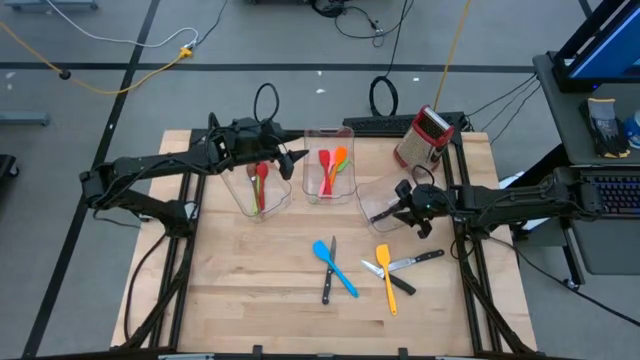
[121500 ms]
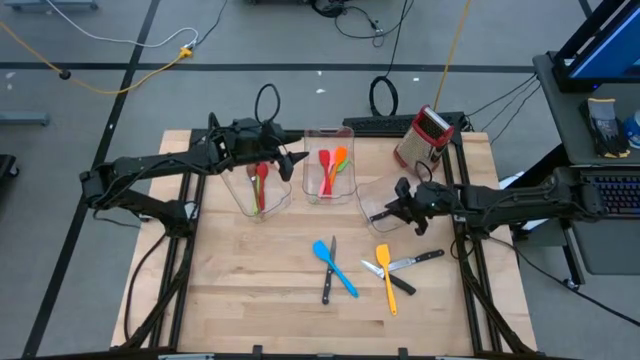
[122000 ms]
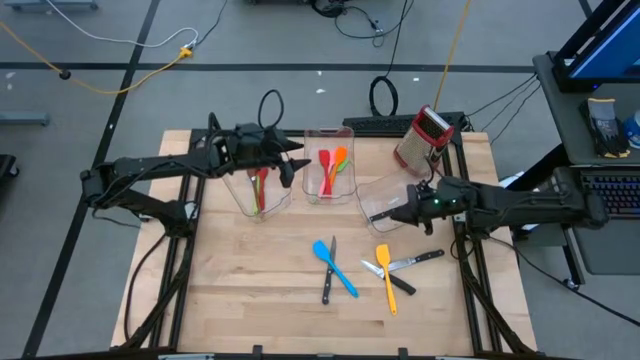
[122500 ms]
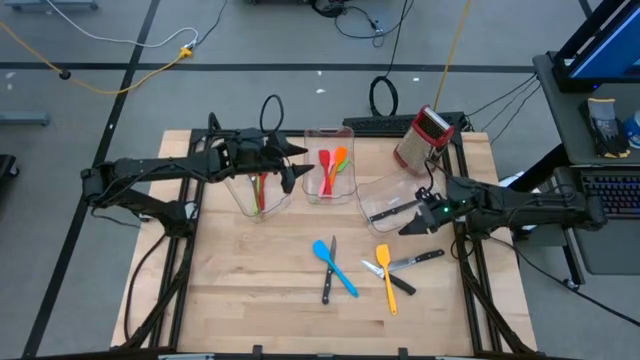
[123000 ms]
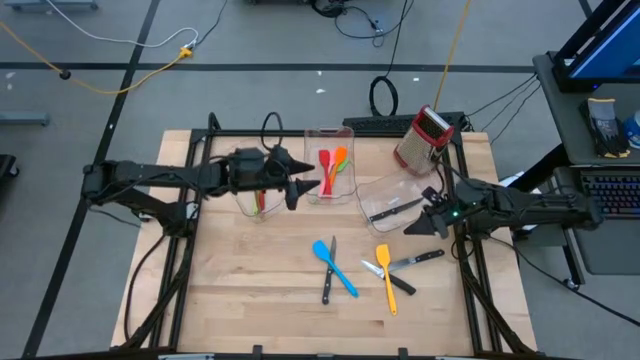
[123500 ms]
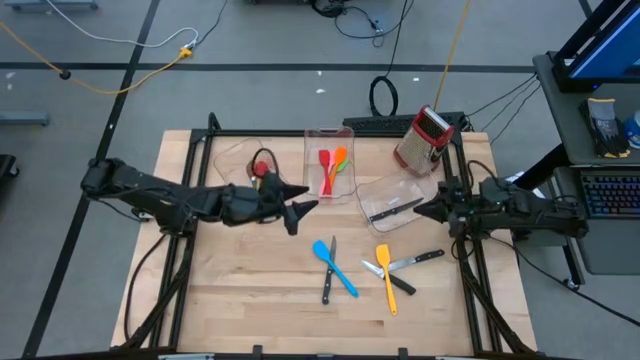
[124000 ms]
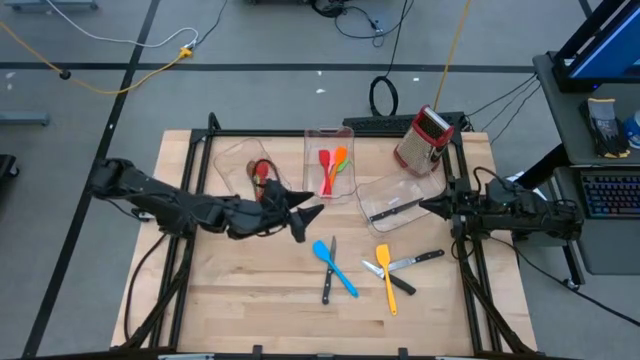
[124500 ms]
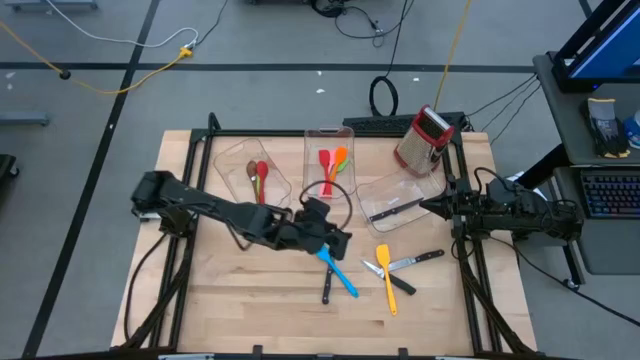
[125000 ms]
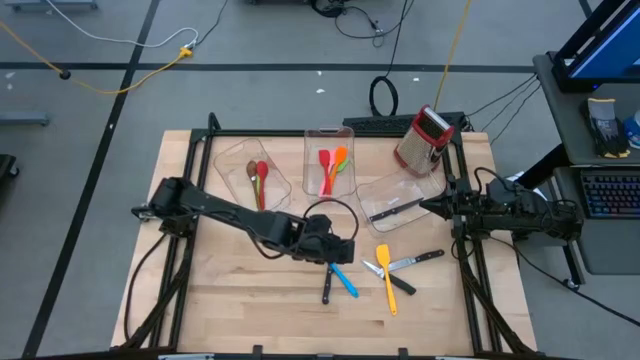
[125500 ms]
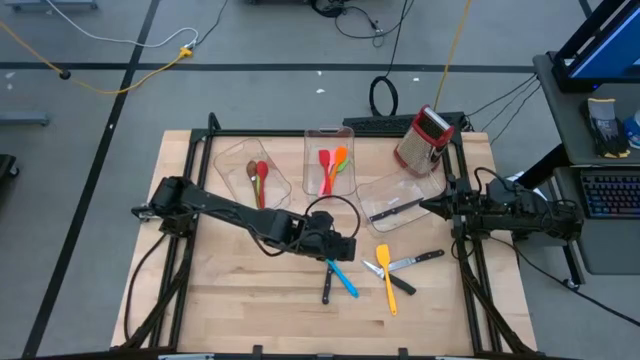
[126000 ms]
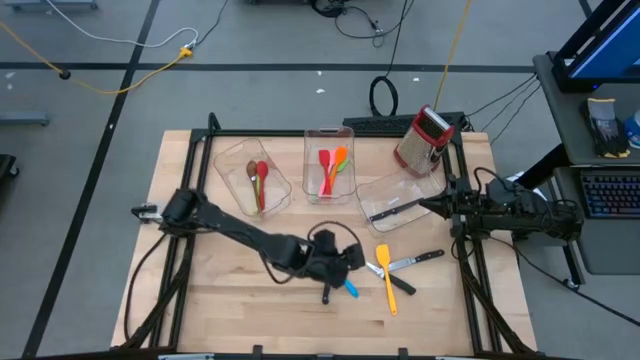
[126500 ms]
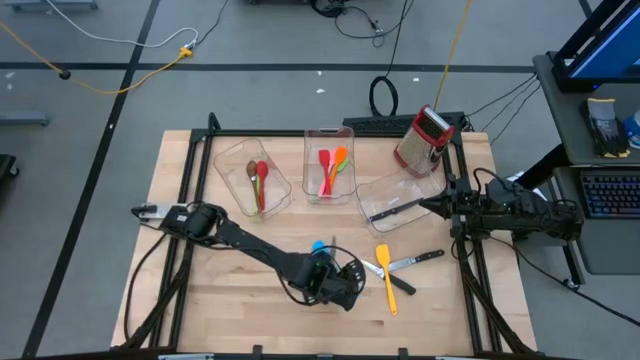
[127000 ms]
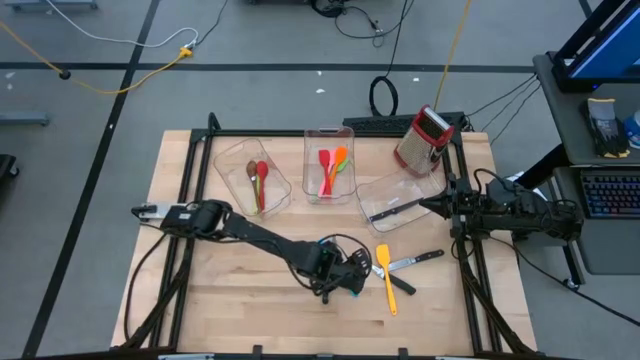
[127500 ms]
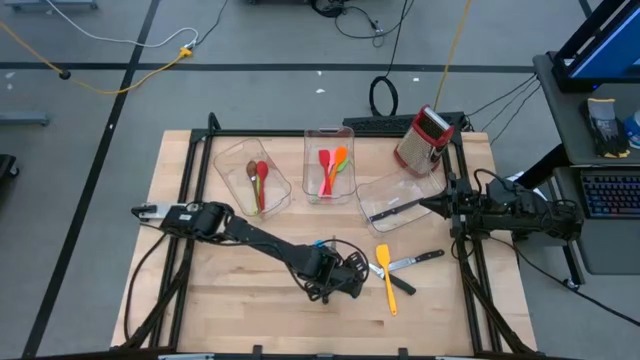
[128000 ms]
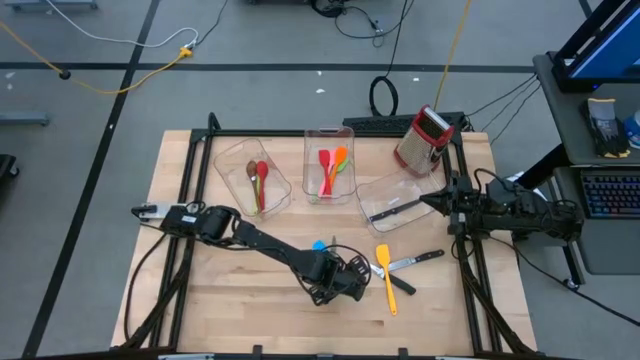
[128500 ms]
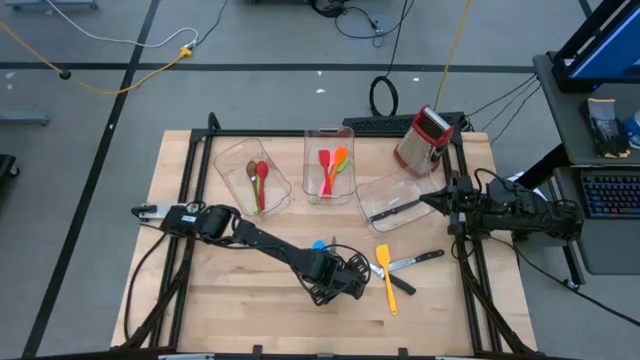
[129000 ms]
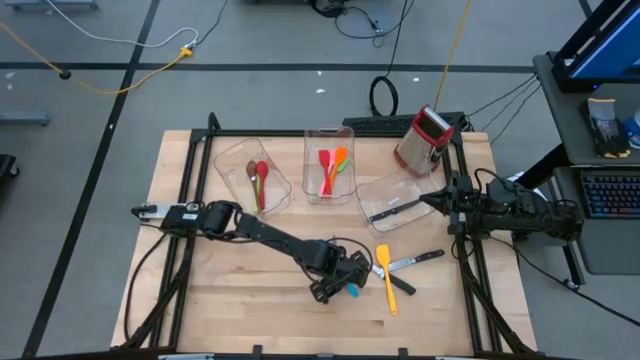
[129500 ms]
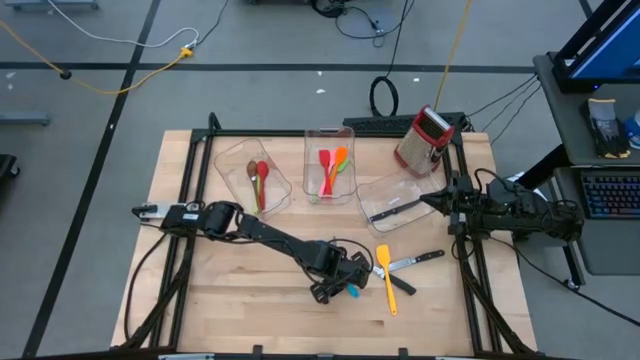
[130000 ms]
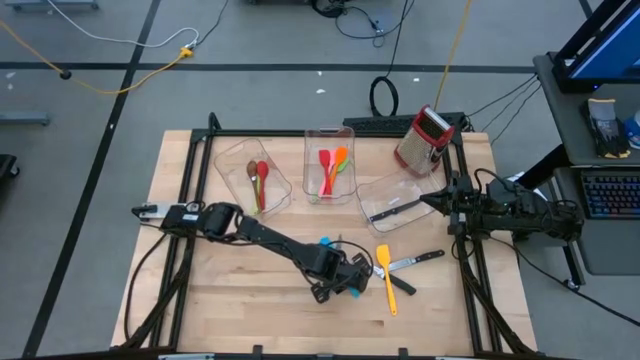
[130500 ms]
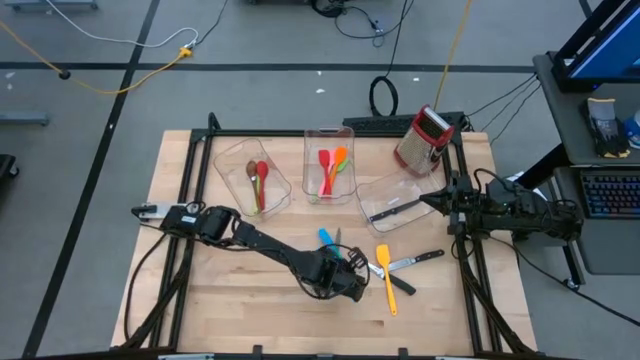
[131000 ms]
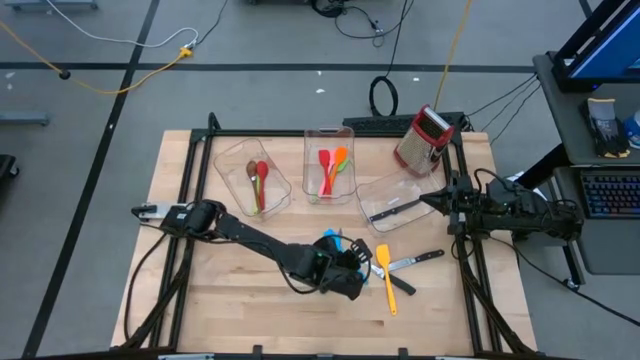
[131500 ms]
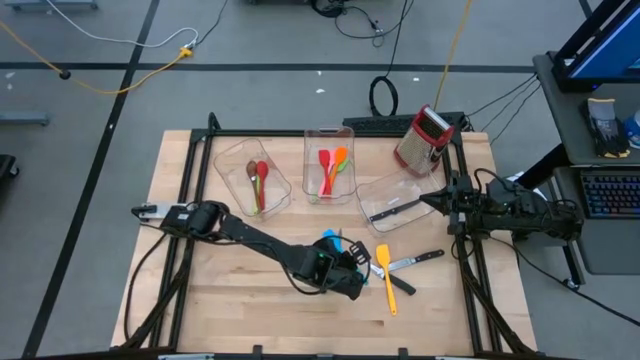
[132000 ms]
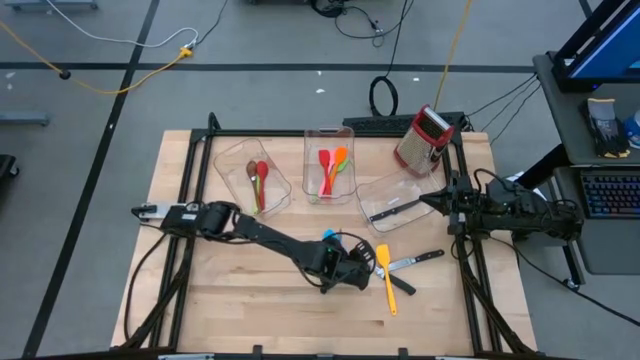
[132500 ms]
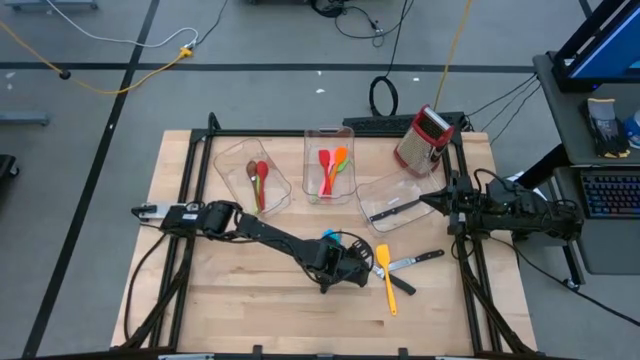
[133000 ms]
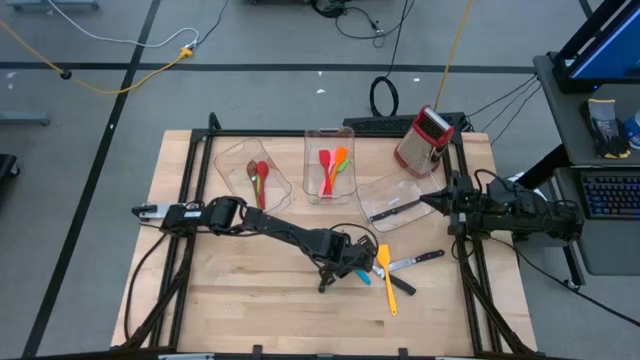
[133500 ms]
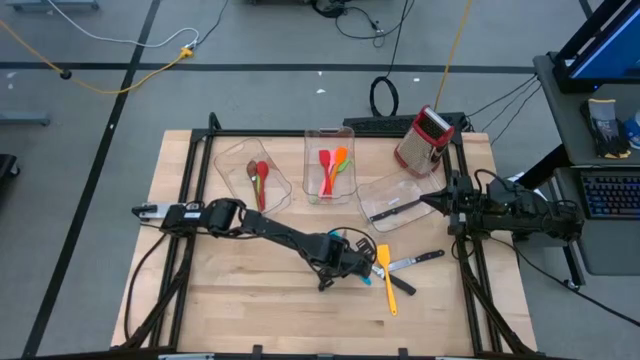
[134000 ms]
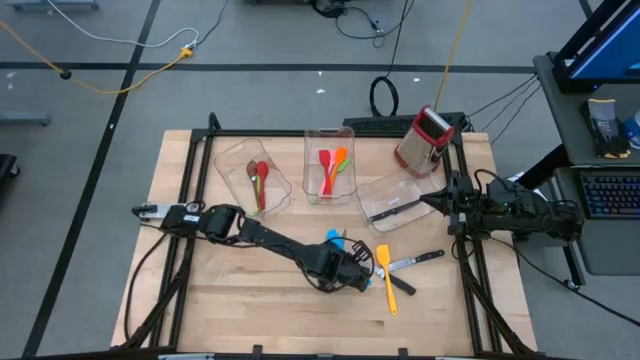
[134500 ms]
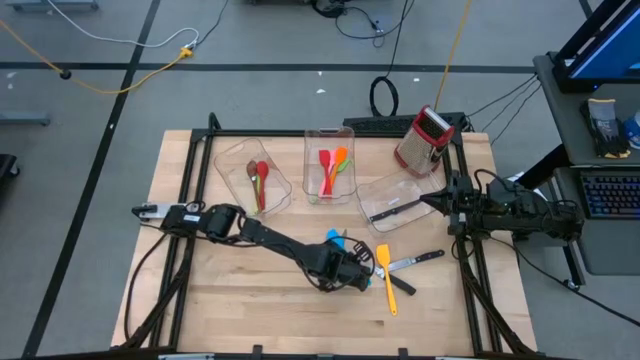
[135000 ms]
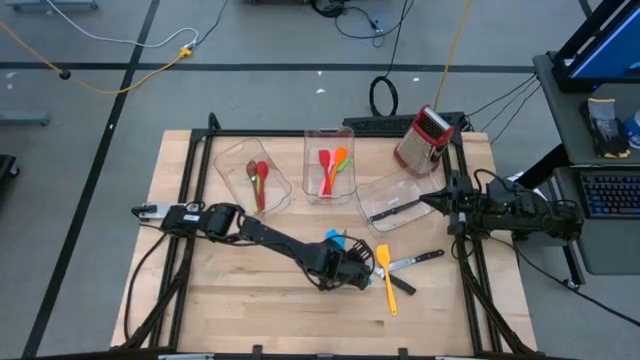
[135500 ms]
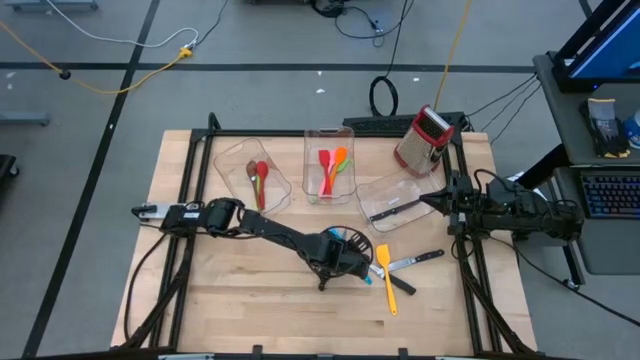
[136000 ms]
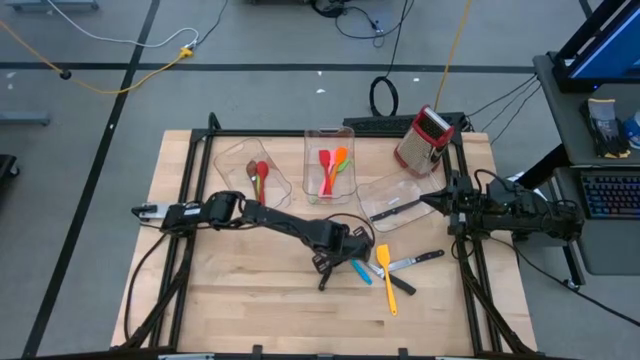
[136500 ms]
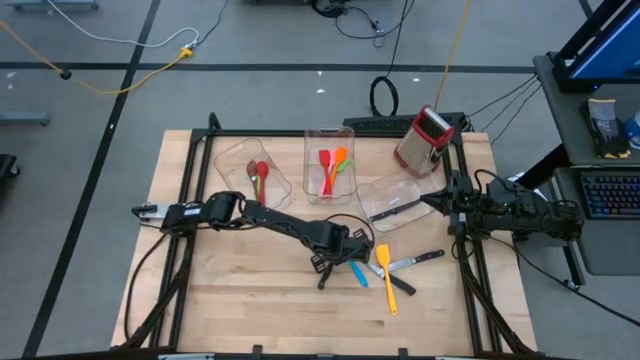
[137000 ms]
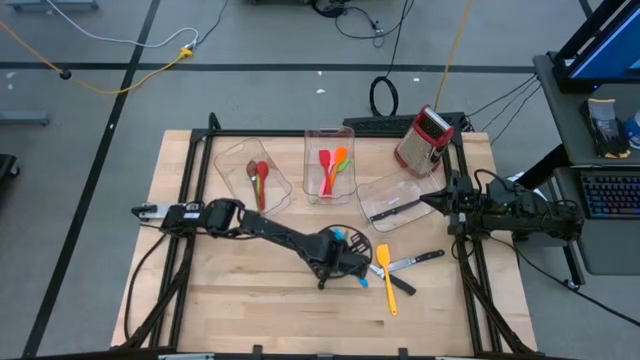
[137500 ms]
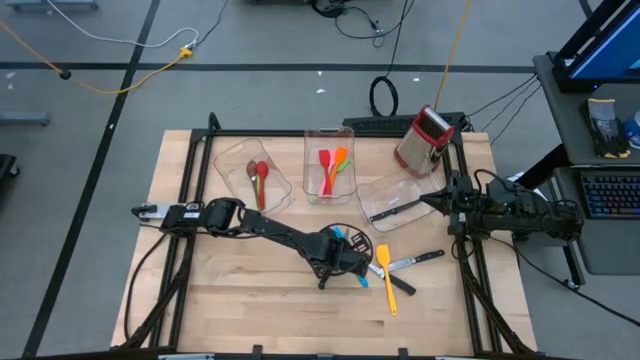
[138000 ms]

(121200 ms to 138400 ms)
Task: Pick & Place Kitchen Items
Put the blue spatula into the middle bin

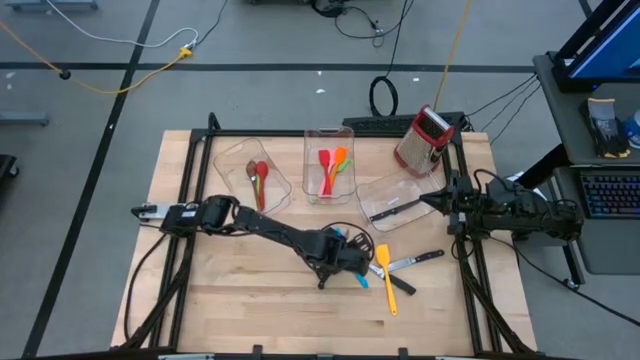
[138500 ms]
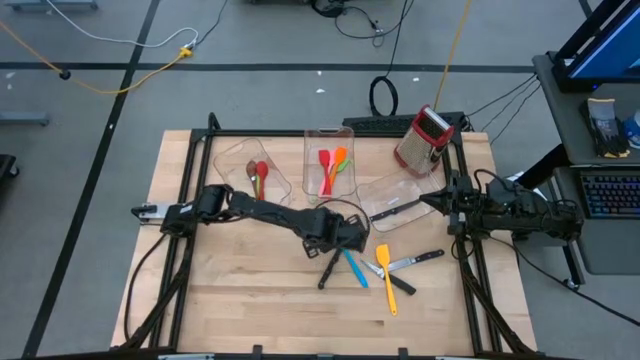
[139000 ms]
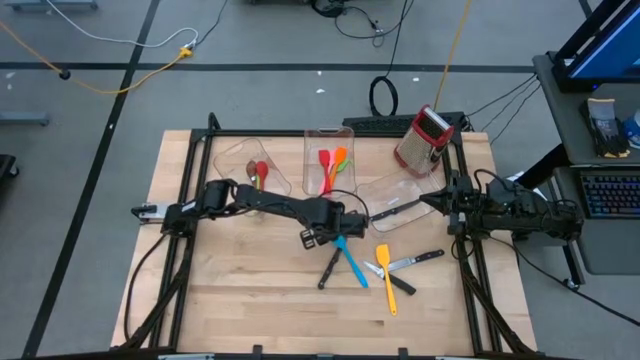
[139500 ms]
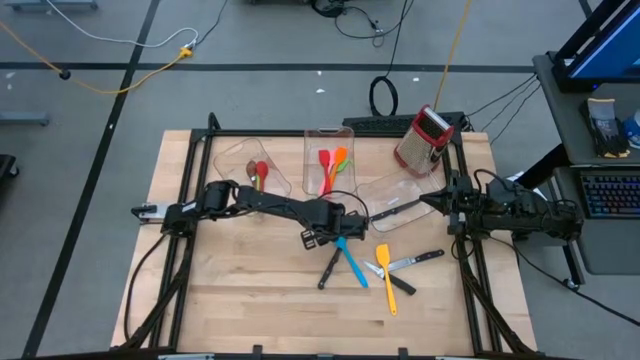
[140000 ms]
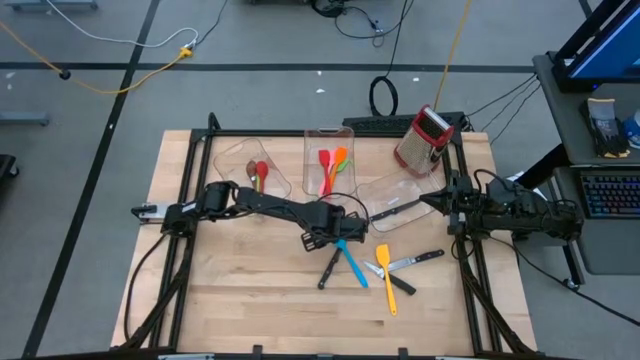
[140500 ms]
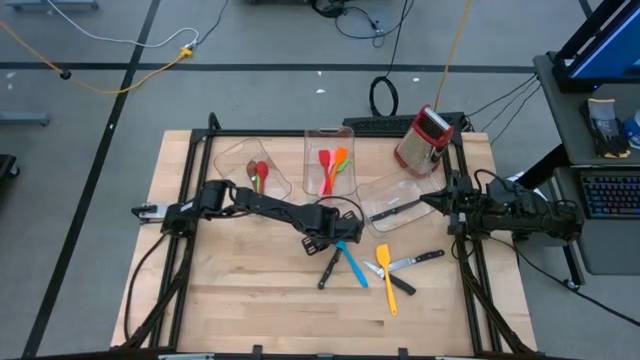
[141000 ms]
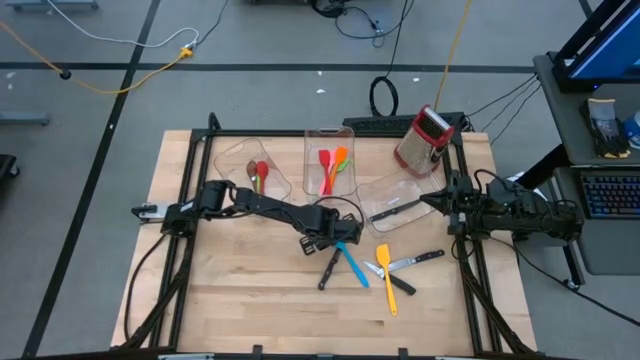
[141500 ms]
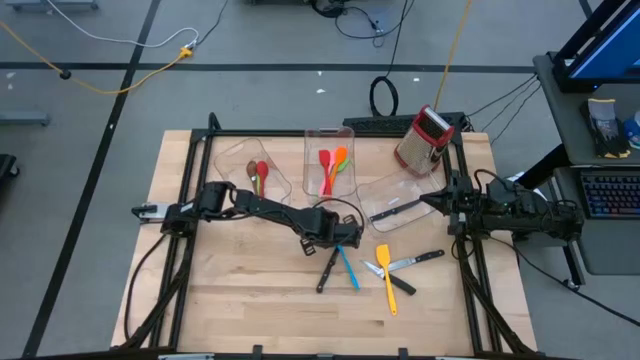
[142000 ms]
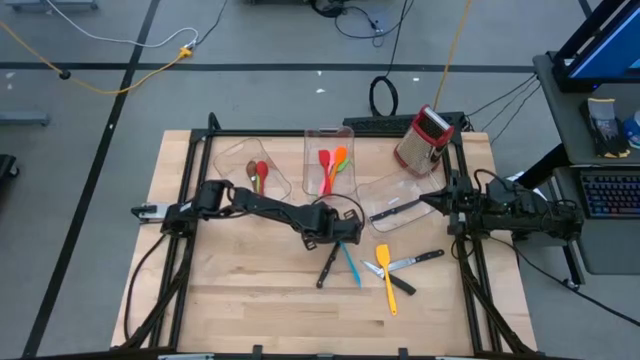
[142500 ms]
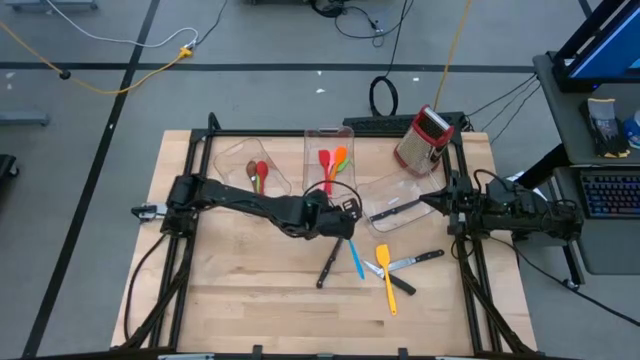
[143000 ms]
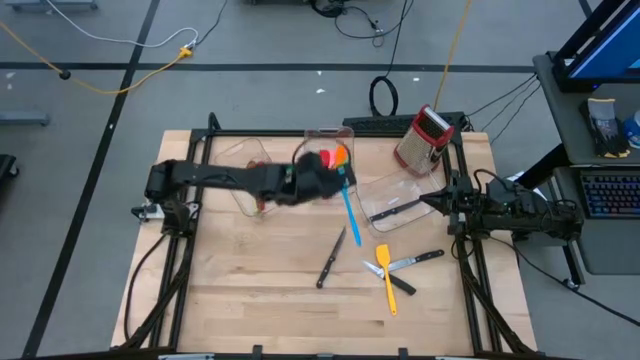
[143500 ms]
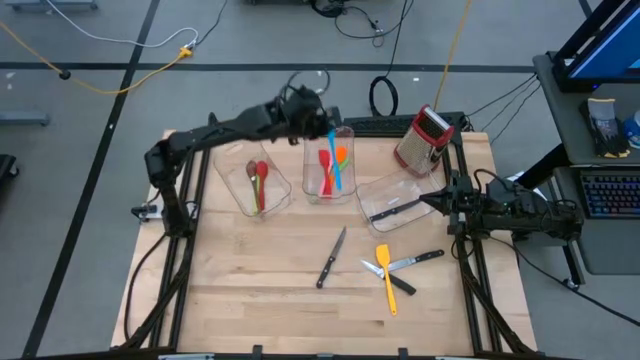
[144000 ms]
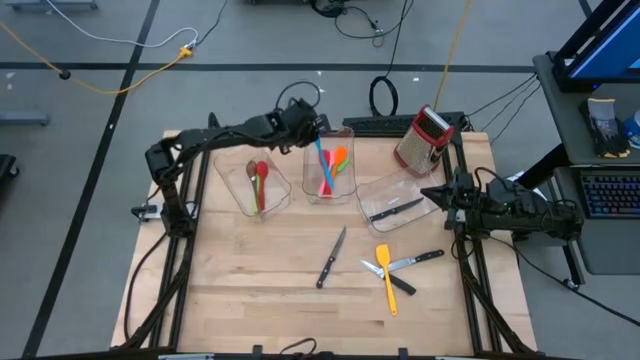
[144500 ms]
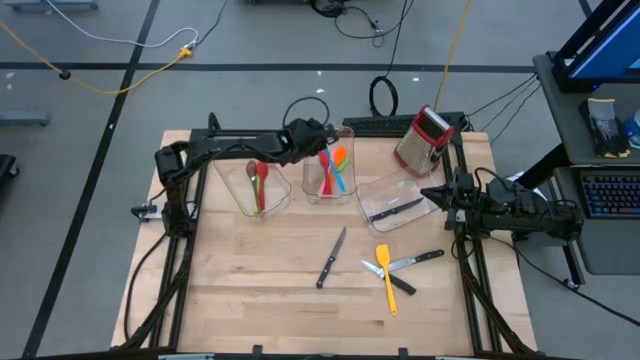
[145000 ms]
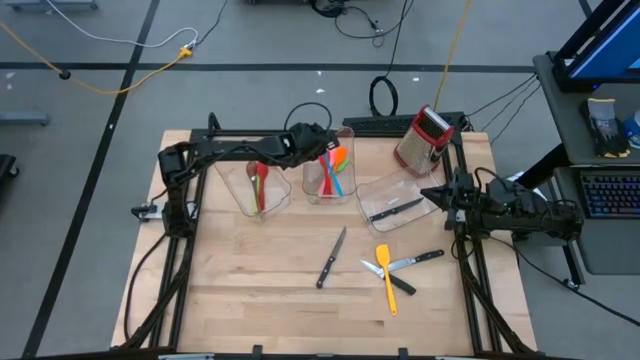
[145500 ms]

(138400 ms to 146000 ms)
Put the blue silicone spatula into the middle bin
